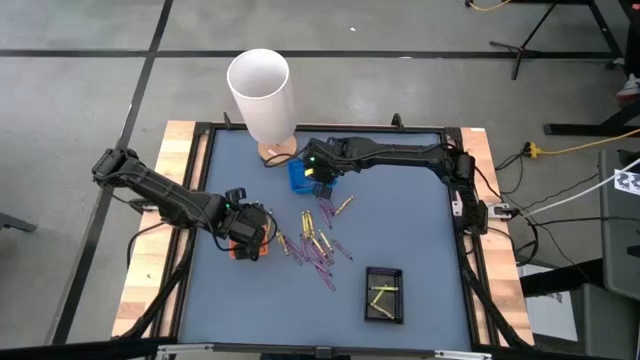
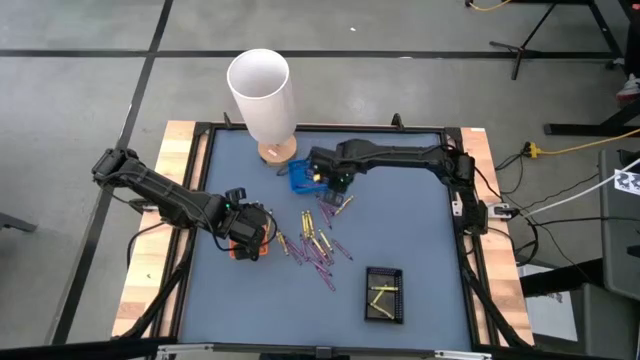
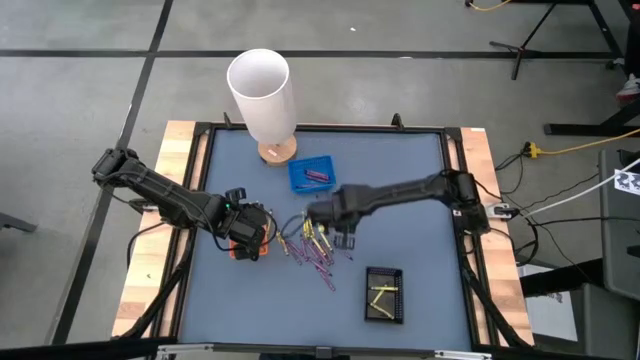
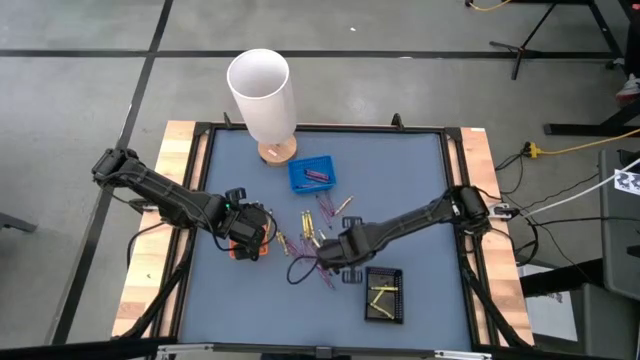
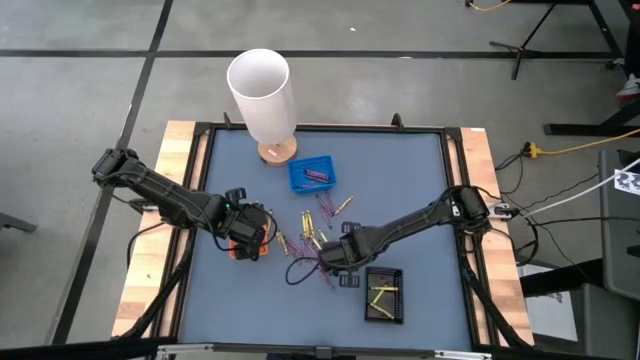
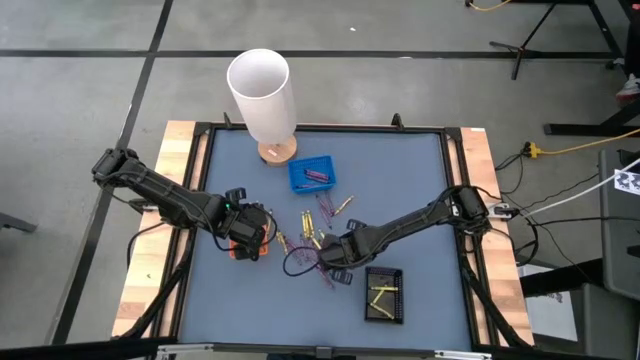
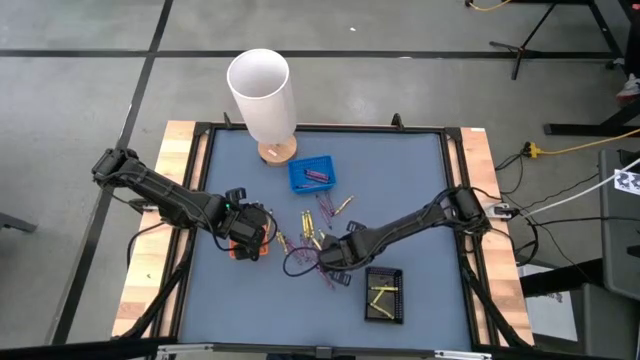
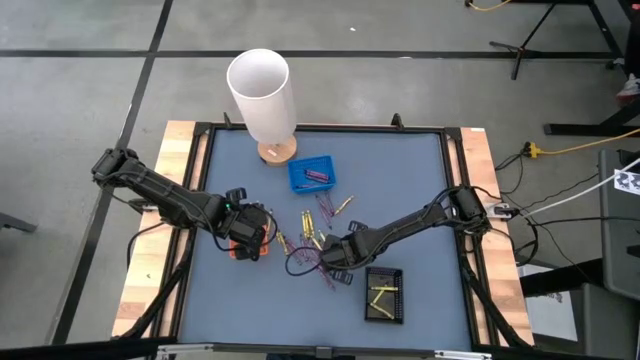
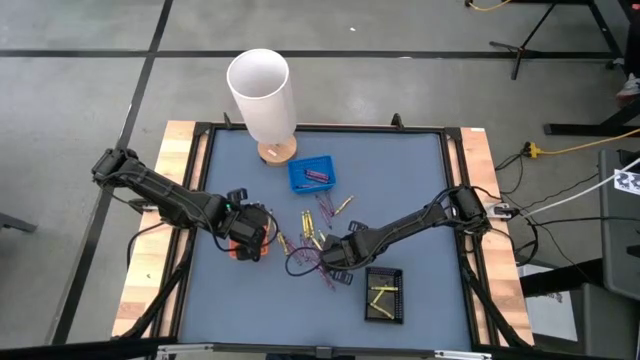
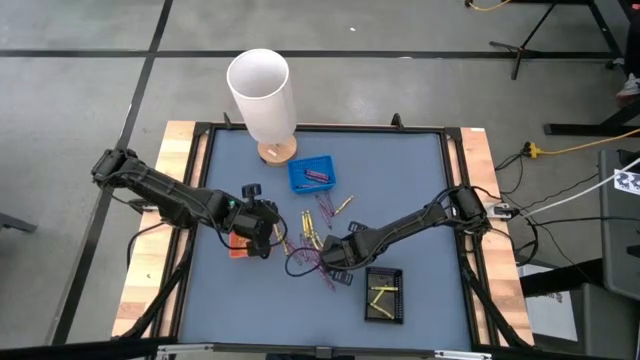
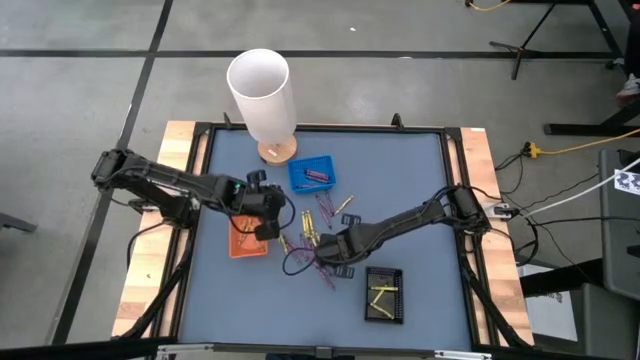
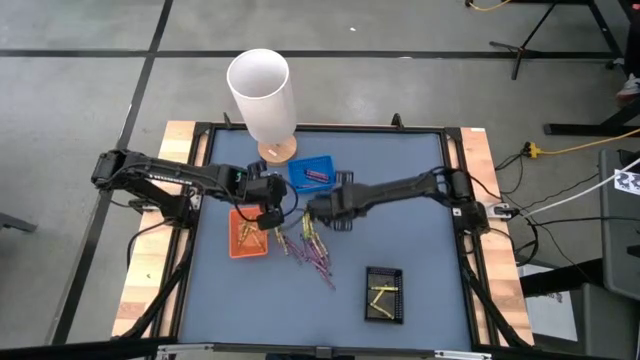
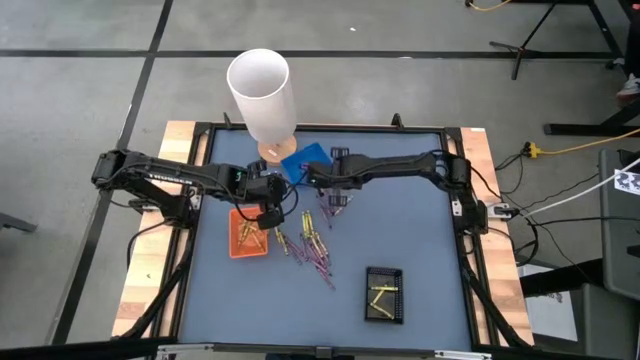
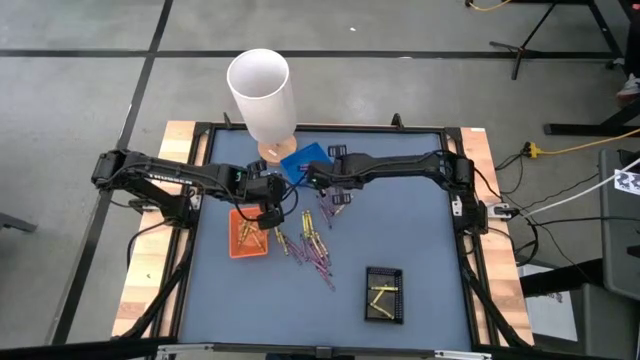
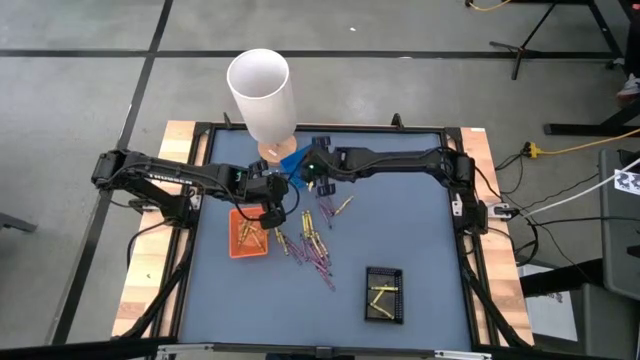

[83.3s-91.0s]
Task: Sort crayons
Put the violet crayon into the blue bin

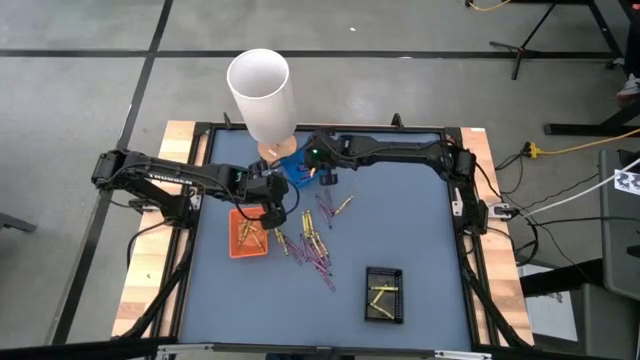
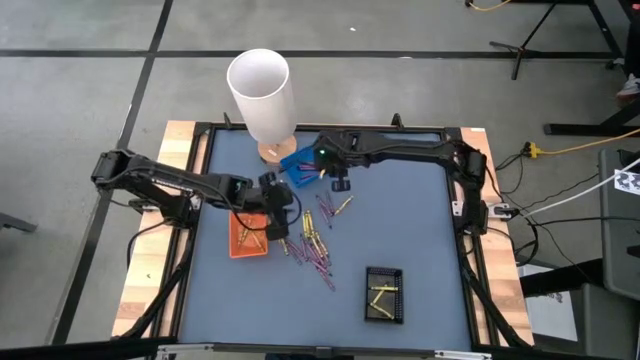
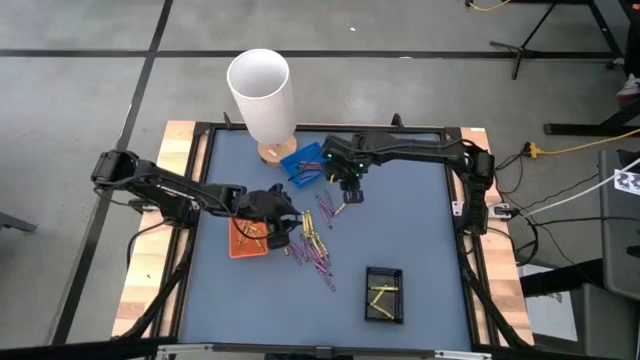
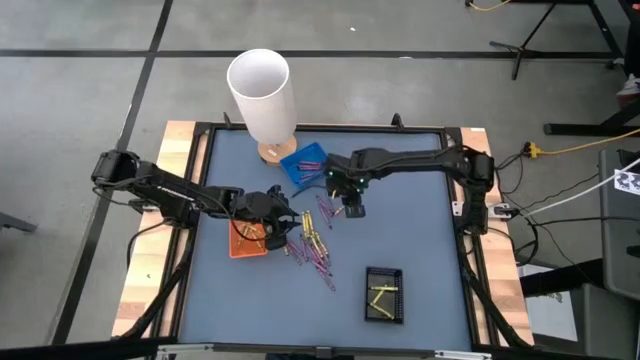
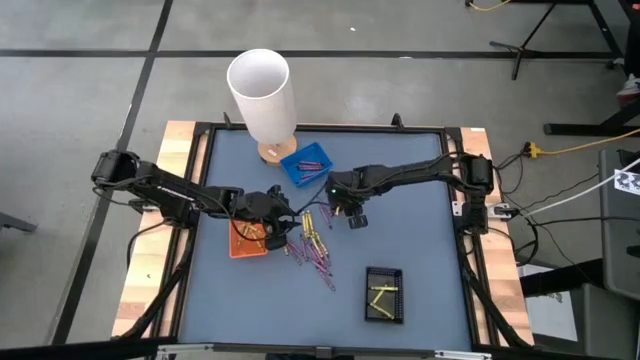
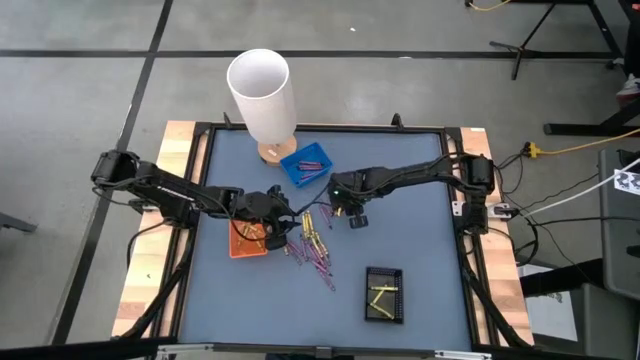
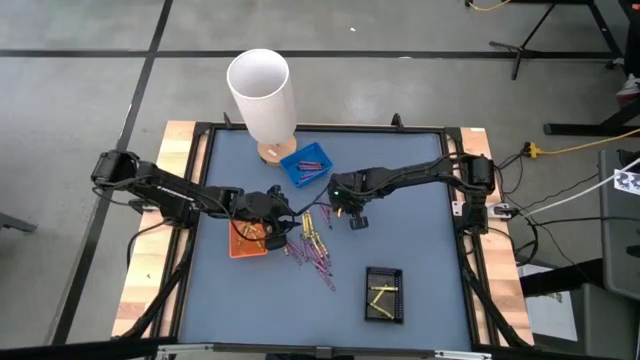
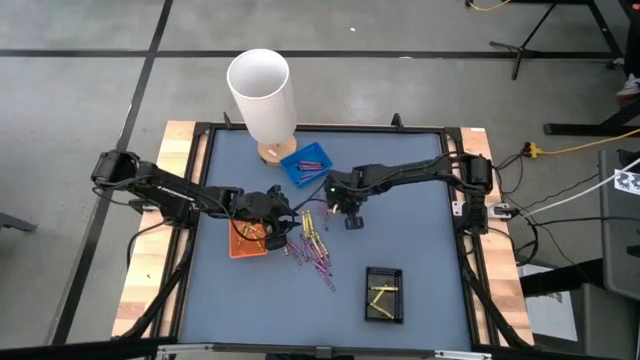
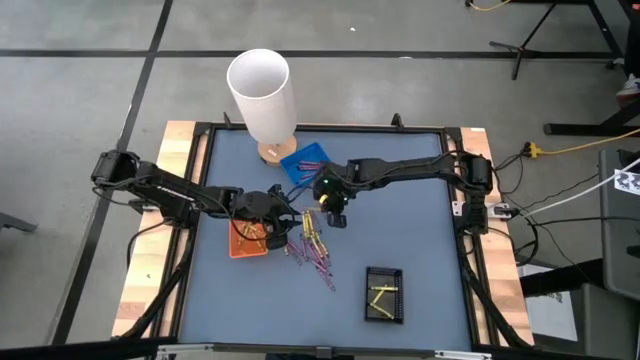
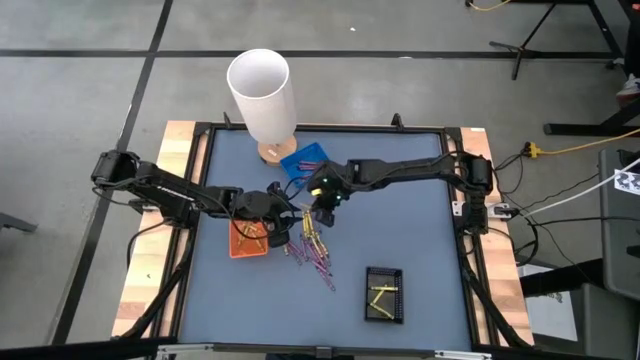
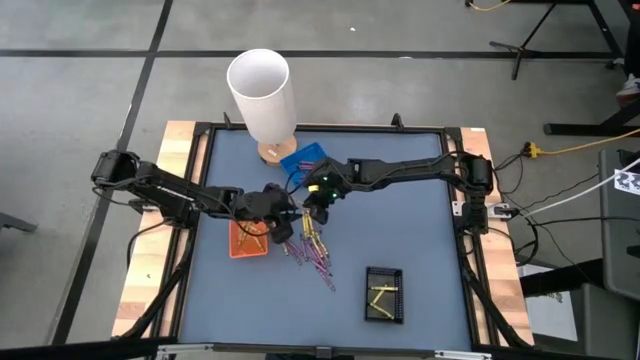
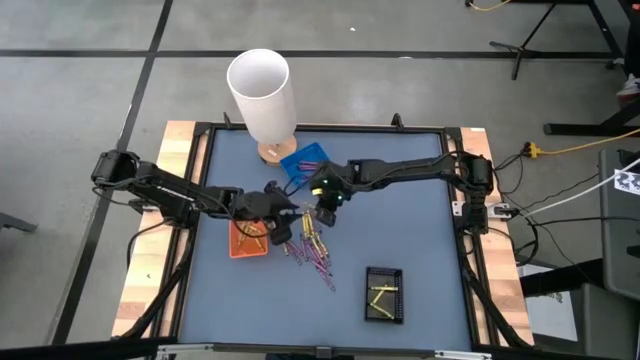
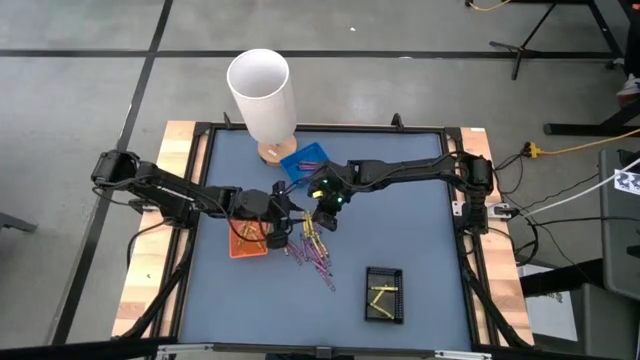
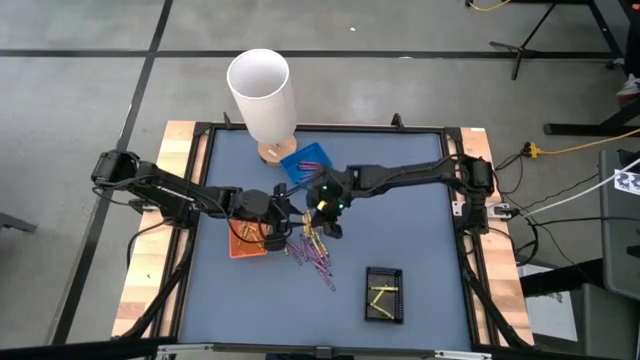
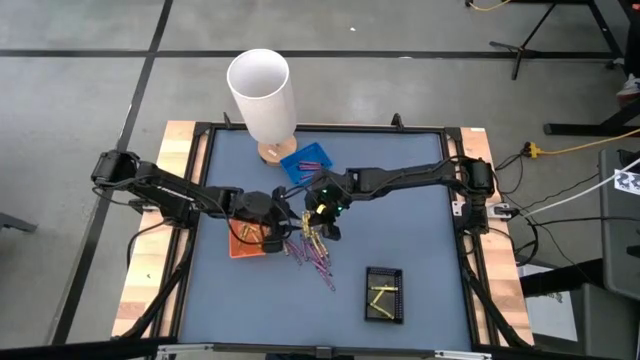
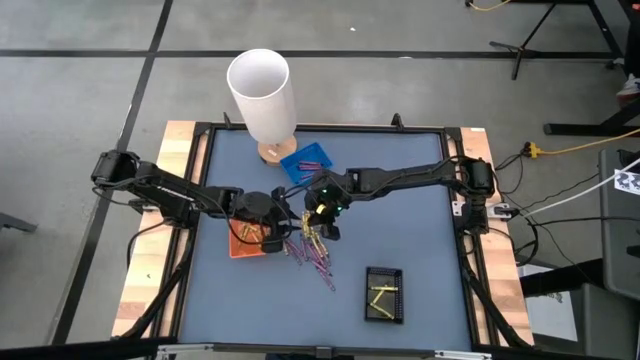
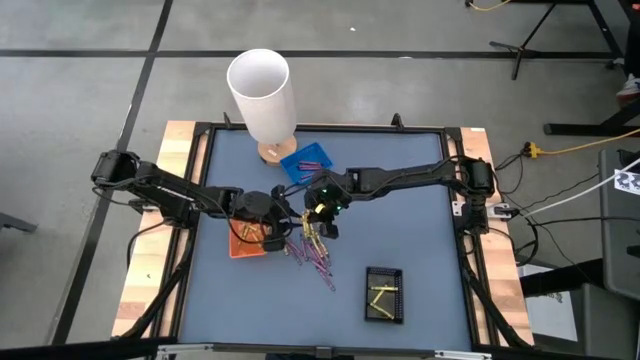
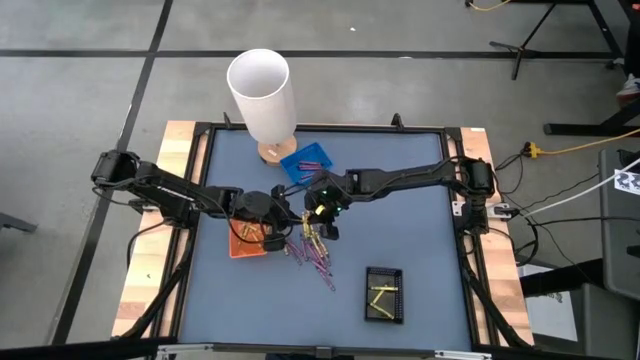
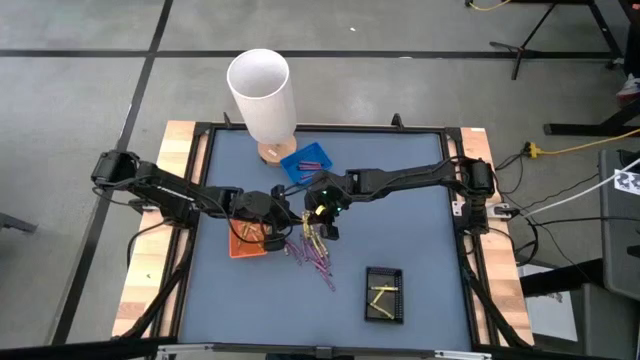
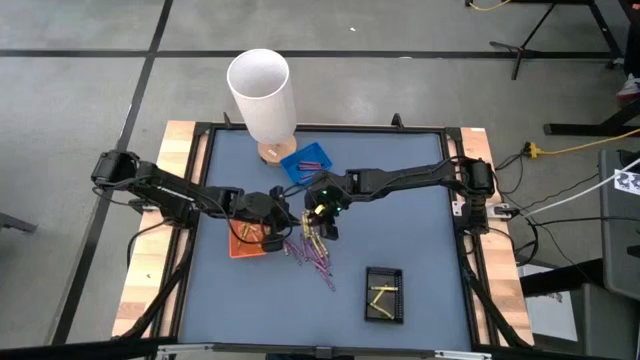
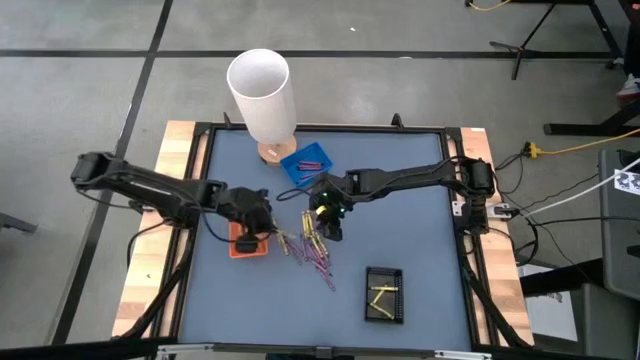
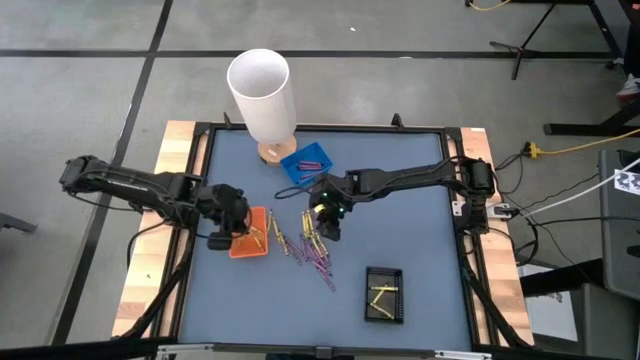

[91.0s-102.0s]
Put the yellow crayon into the orange bin

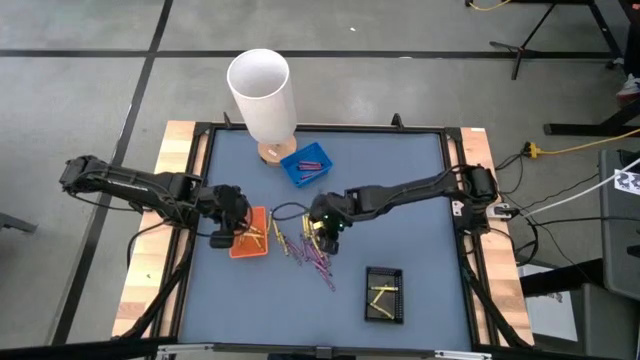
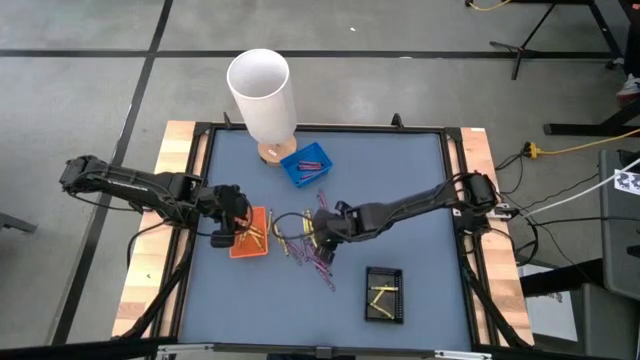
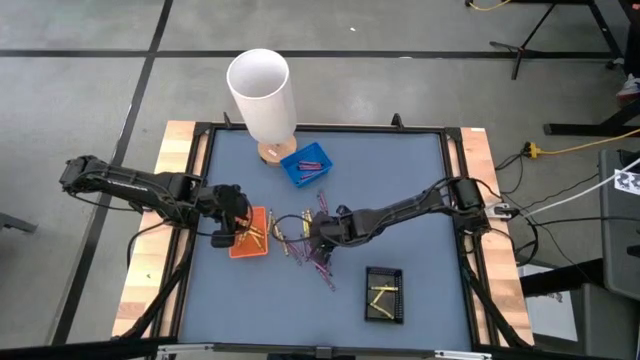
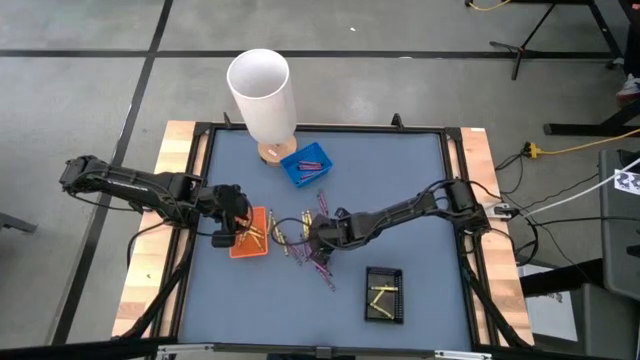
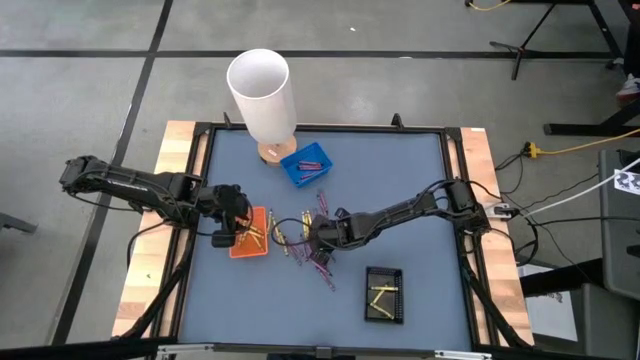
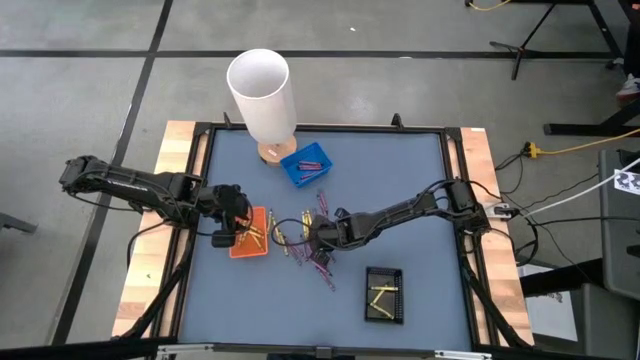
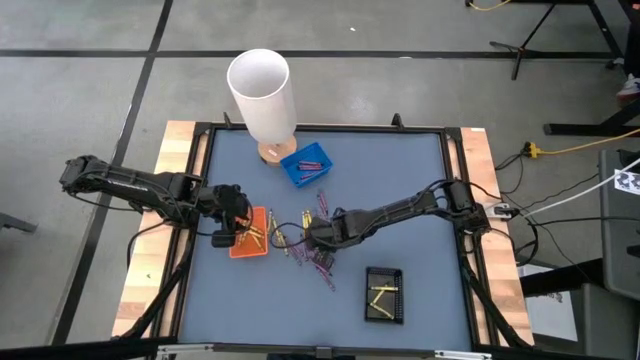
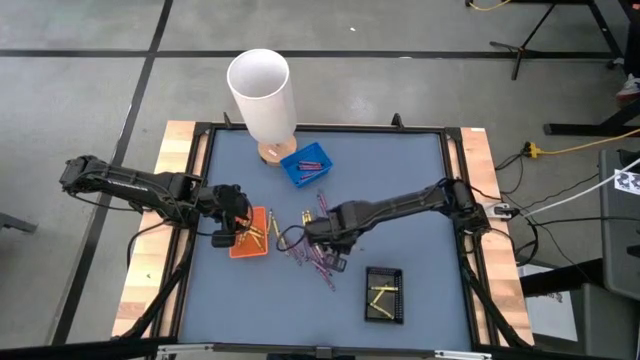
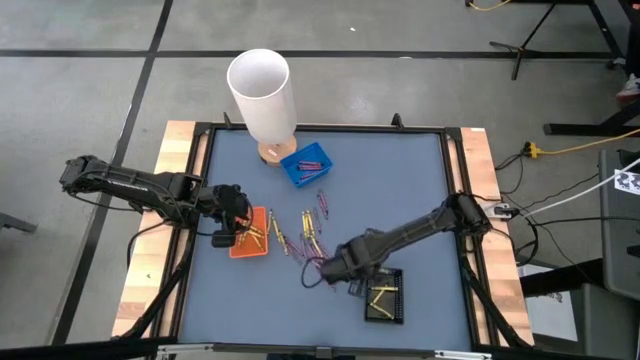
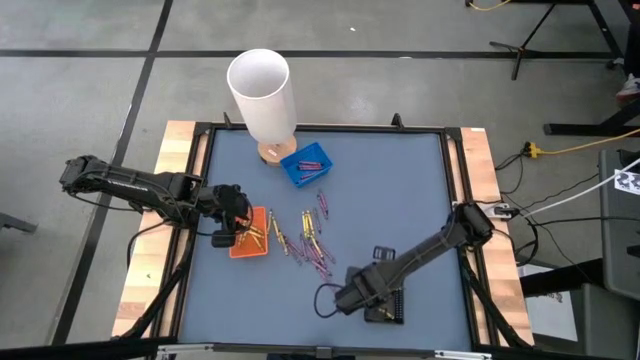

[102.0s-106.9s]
Put the green crayon into the black bin
